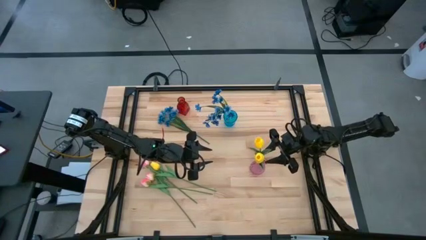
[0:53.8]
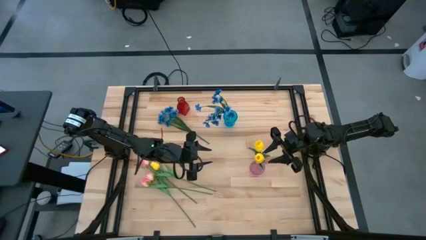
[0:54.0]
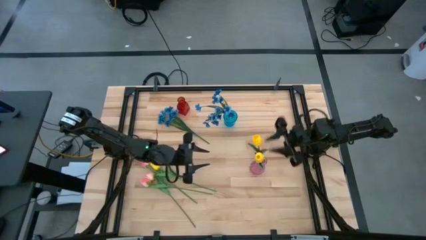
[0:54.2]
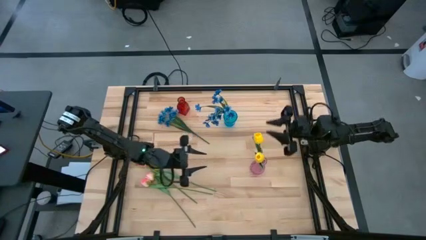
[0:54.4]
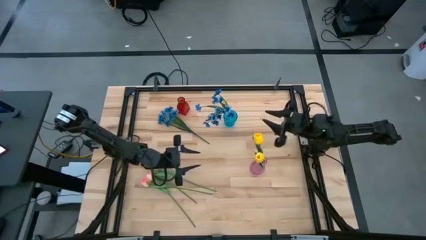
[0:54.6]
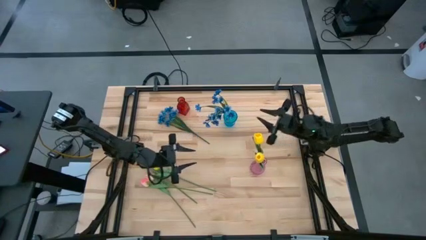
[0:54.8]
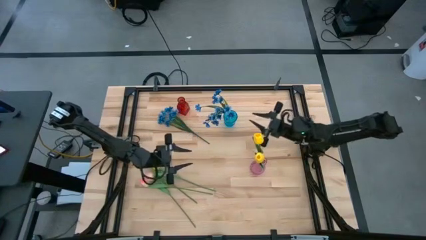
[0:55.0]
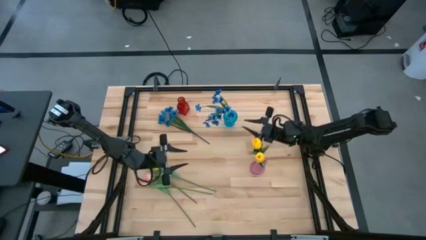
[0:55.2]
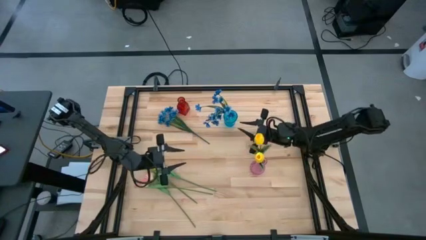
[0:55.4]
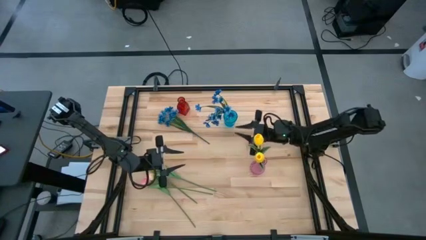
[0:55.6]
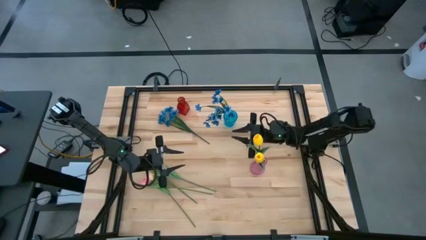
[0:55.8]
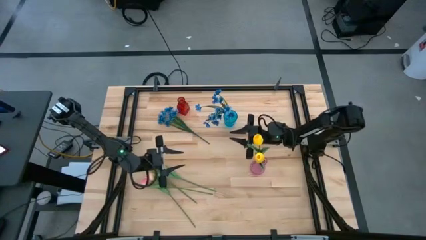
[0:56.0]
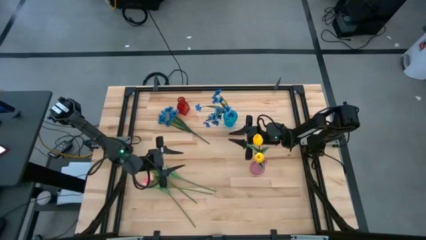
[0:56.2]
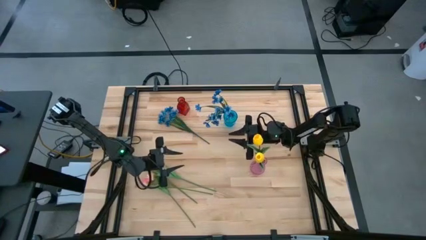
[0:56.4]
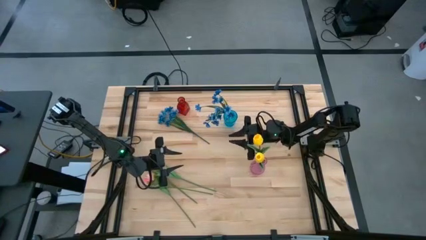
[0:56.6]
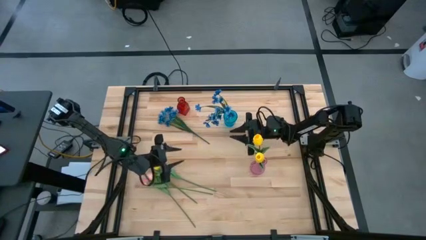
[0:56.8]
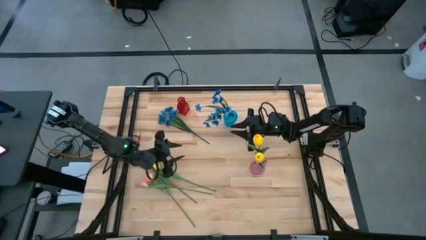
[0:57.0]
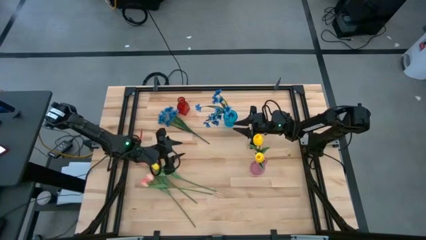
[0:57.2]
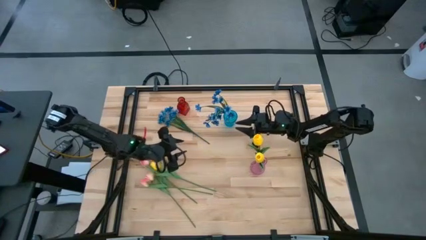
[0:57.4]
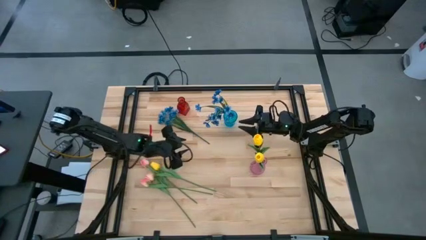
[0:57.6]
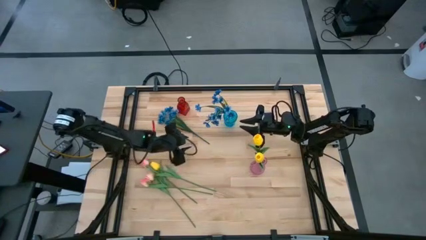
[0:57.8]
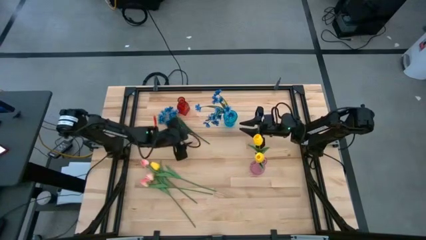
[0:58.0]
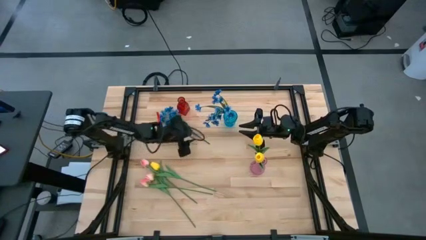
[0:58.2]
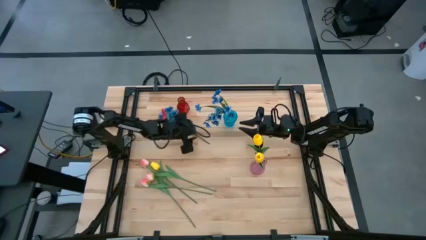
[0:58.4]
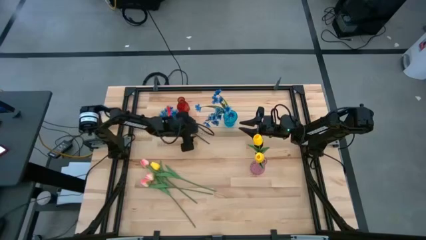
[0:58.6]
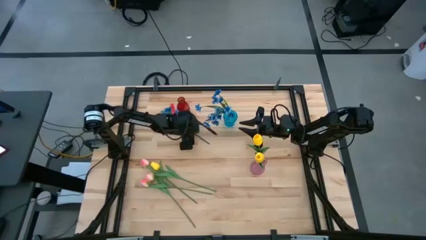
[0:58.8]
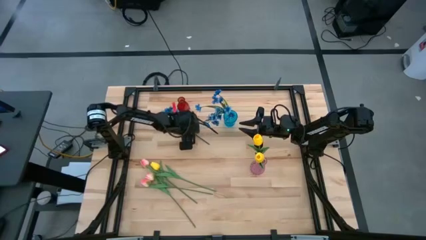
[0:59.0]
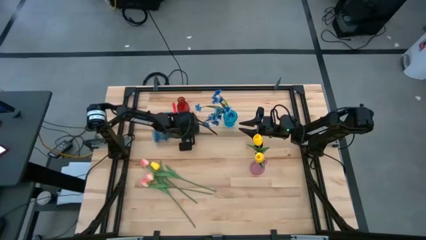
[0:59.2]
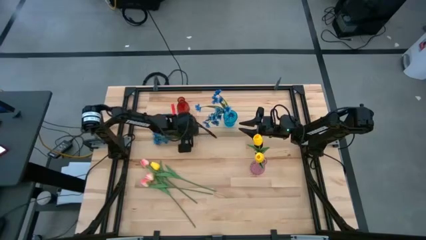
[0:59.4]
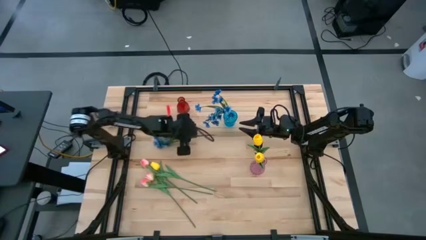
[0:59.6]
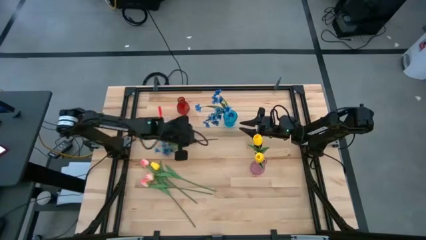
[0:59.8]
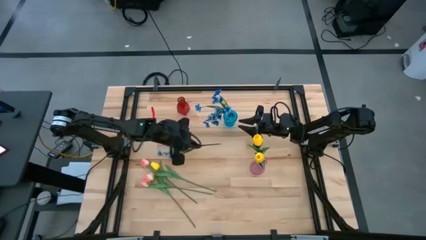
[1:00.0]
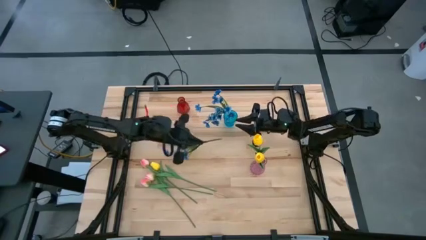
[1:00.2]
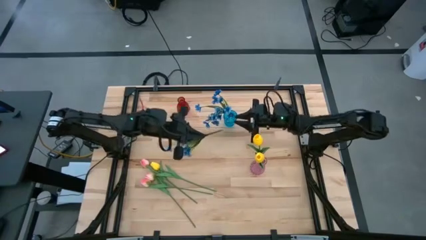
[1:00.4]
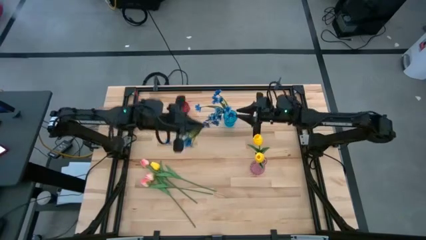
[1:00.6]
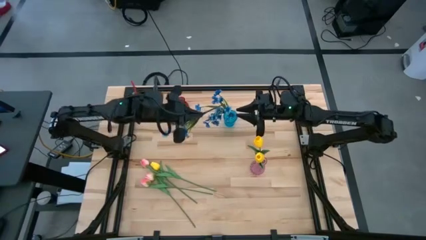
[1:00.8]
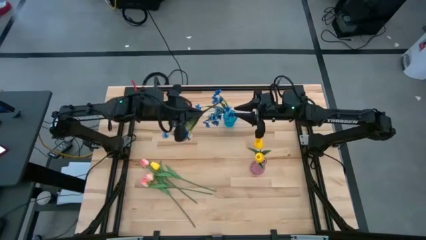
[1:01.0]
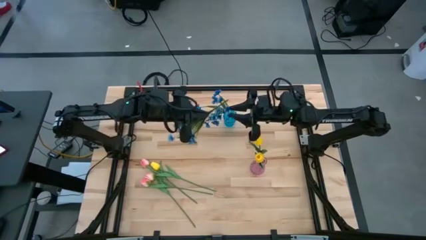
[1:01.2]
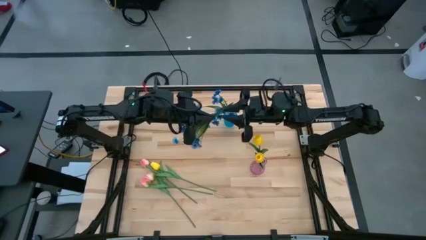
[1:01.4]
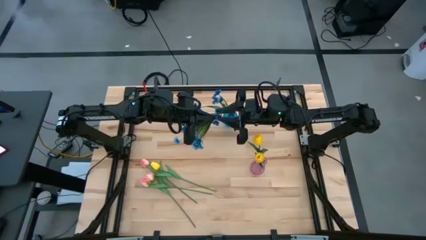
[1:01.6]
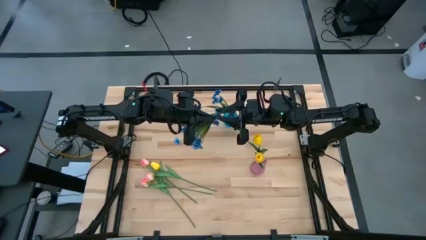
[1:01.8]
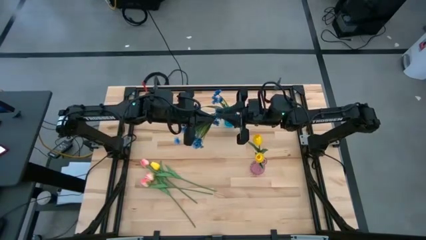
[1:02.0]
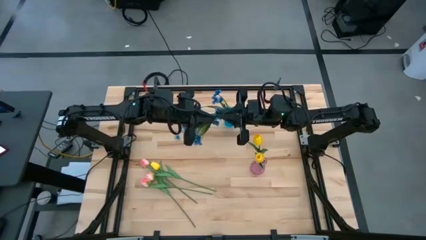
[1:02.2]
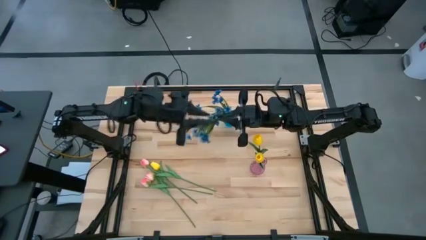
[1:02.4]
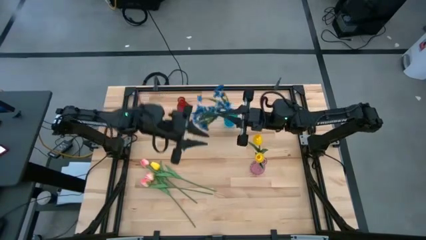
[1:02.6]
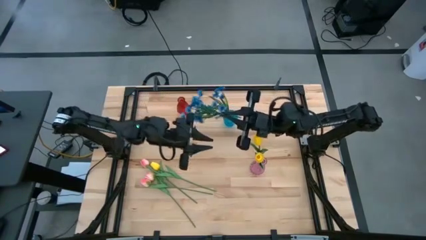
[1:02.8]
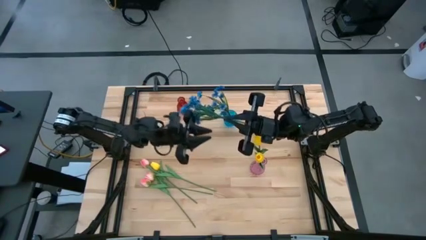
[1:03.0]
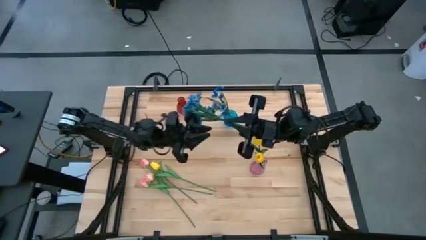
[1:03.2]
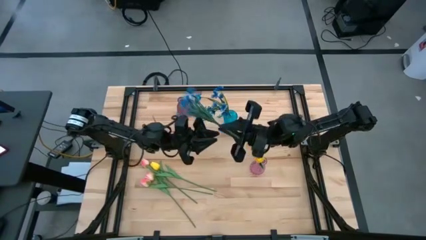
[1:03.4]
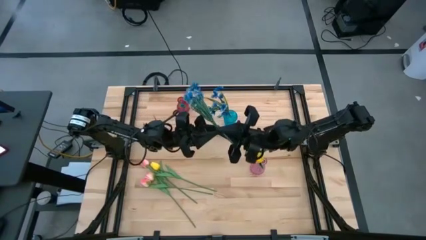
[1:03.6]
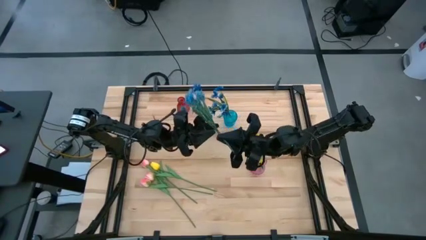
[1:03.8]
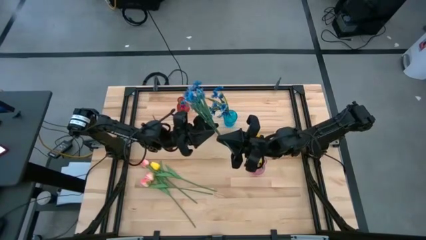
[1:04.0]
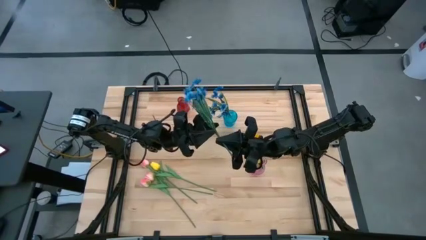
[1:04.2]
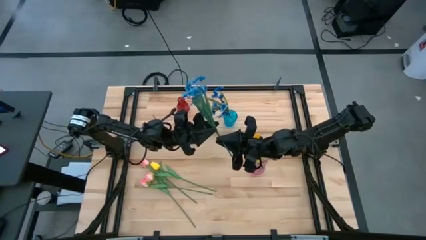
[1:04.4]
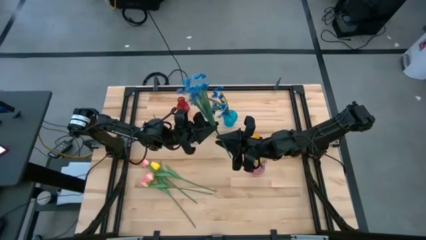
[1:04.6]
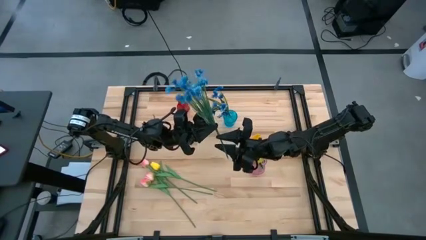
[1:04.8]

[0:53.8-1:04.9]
Task: Sort flowers into vase by color
Put the blue flower into the blue flower vase

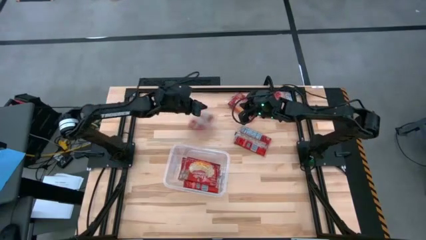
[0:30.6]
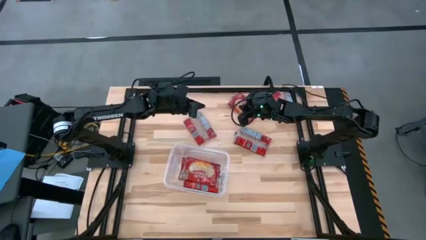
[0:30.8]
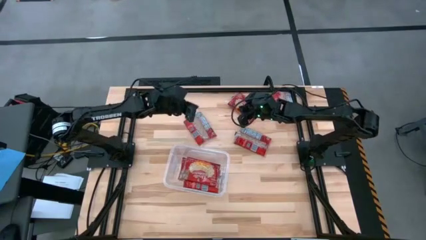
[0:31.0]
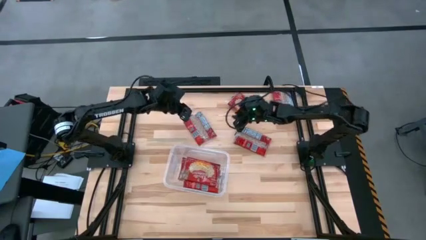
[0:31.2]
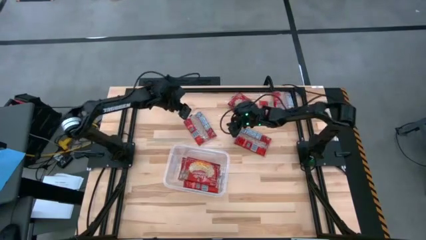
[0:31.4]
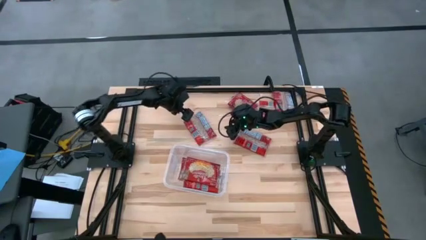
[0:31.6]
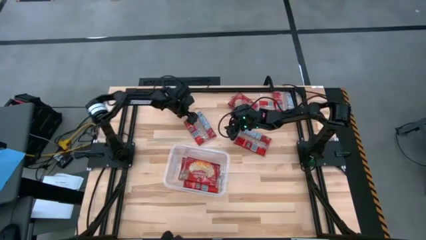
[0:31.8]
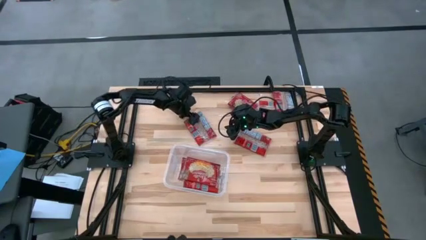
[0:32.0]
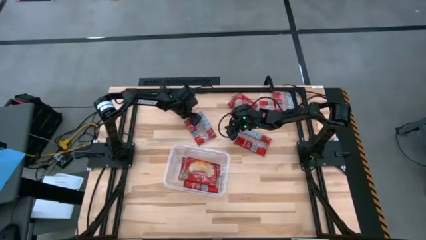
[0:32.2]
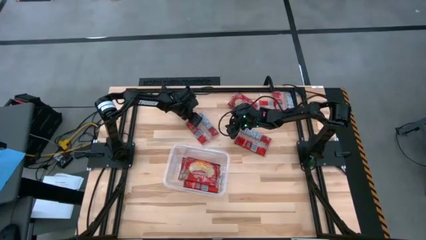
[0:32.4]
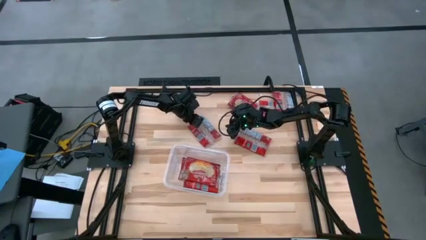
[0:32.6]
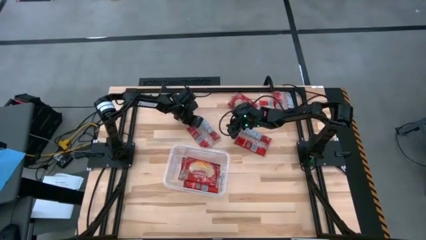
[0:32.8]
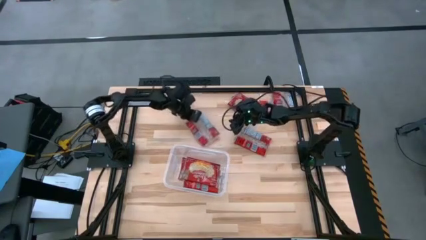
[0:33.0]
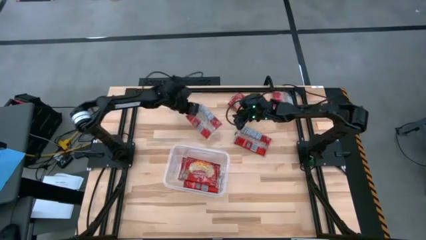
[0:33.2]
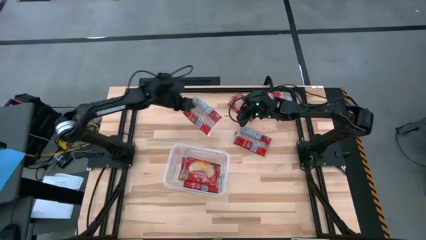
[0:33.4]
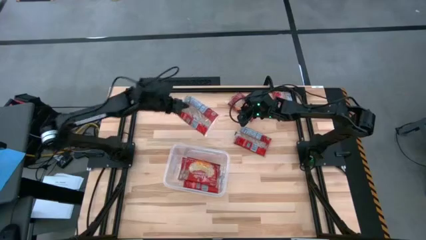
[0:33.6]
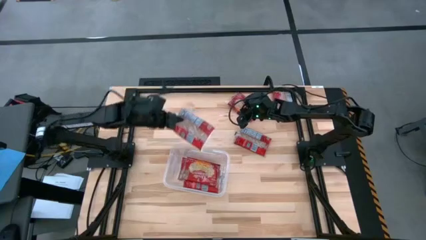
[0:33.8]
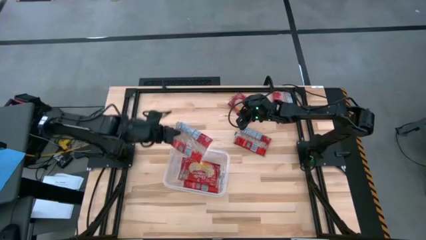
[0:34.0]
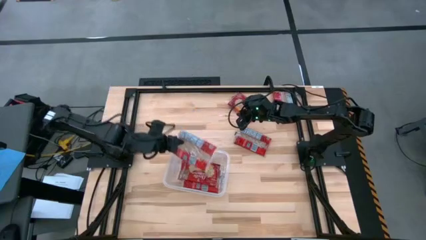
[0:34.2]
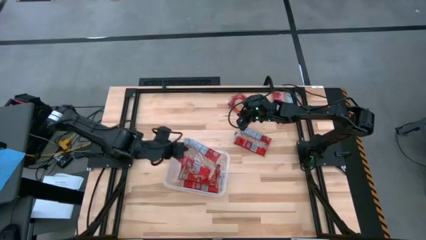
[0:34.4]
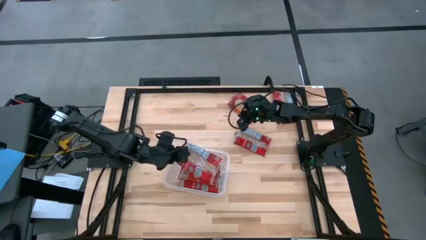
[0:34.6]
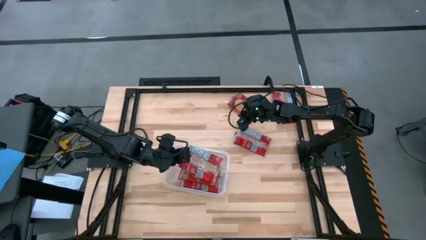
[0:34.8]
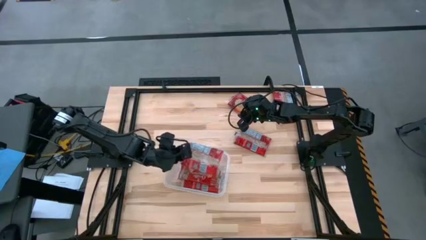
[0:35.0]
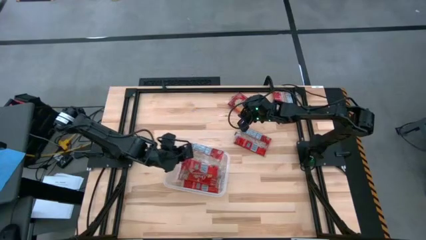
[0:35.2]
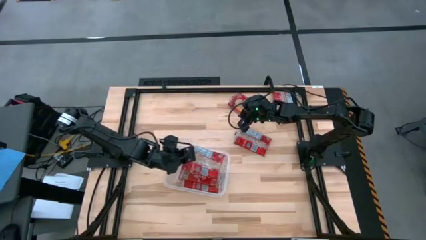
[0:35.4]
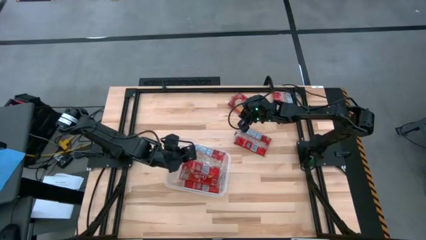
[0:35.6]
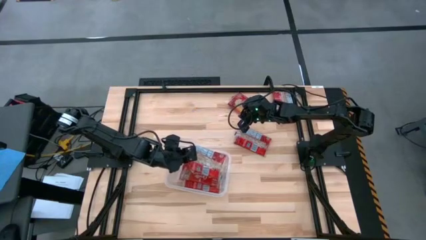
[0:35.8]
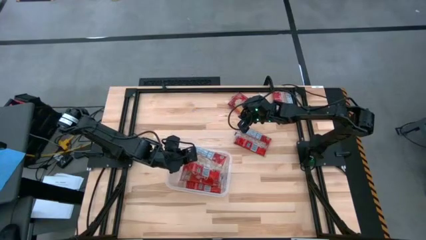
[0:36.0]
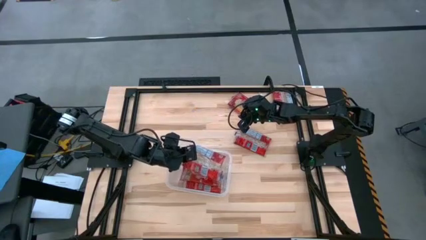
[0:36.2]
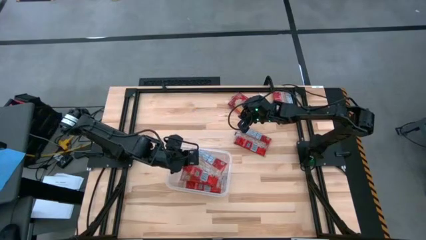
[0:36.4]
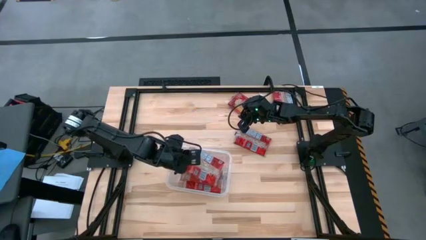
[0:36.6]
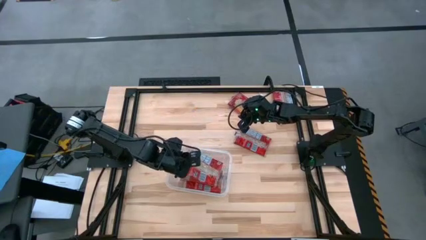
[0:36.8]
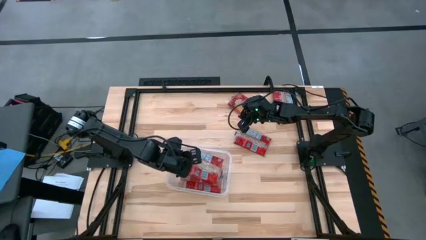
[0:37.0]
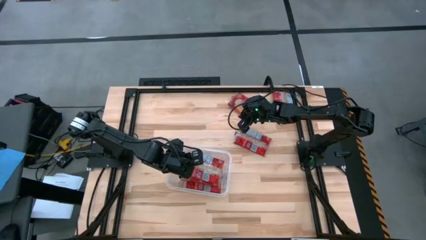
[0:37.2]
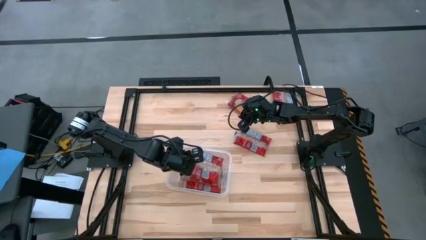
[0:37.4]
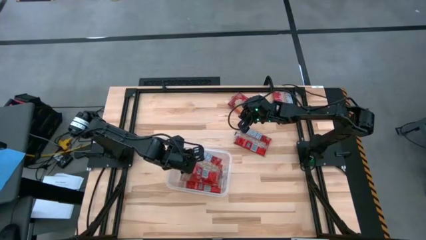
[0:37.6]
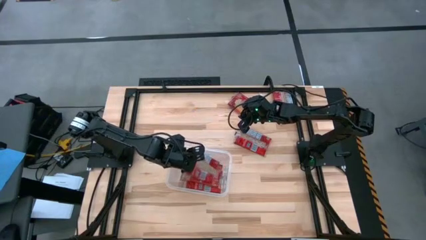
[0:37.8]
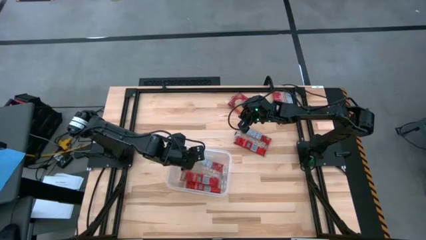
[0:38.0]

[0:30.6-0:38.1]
Task: Sort popcorn bags into baskets
Put the red popcorn bag into the container
